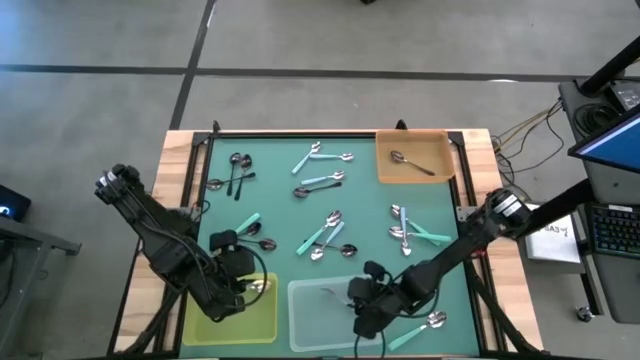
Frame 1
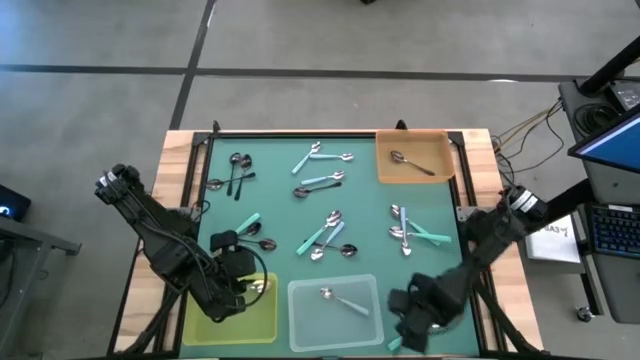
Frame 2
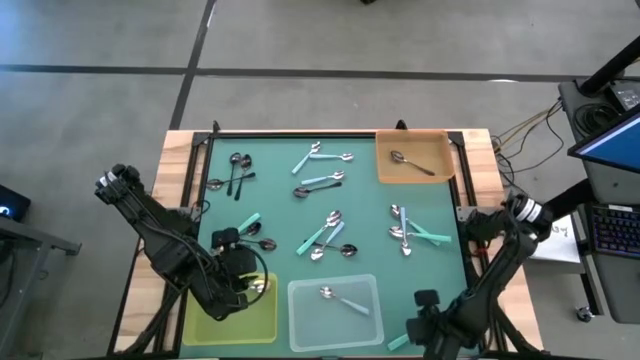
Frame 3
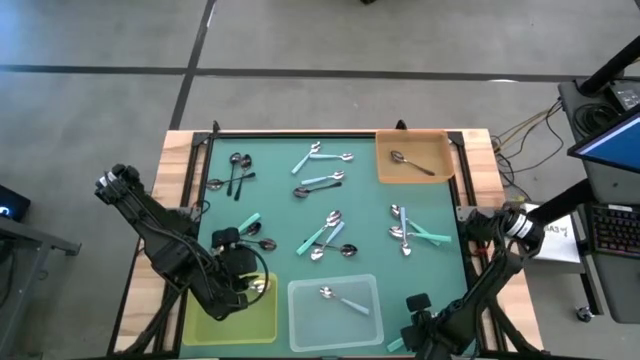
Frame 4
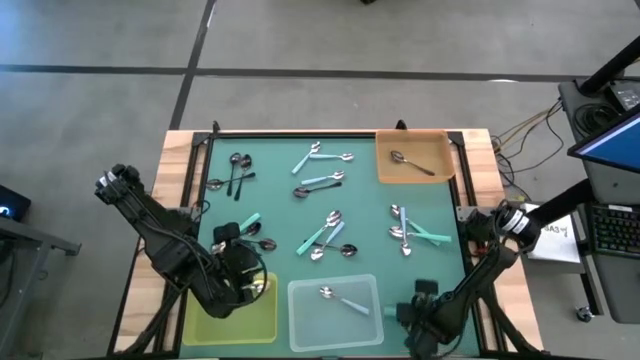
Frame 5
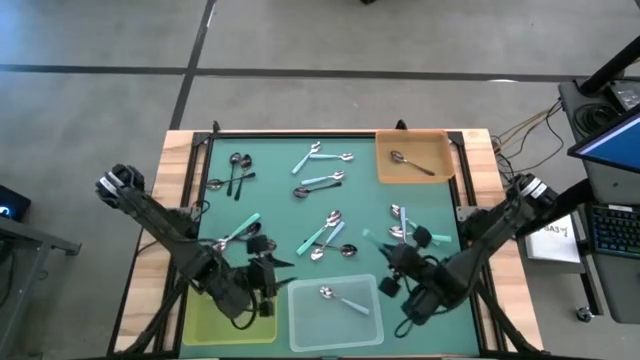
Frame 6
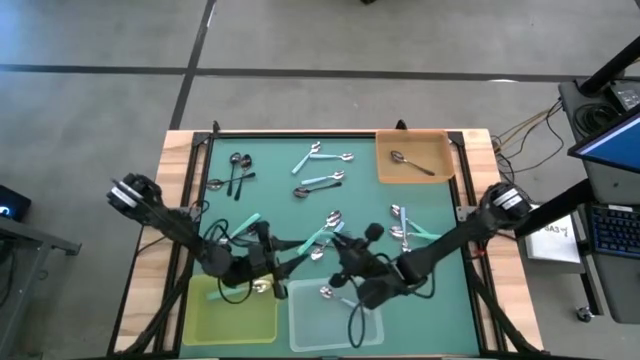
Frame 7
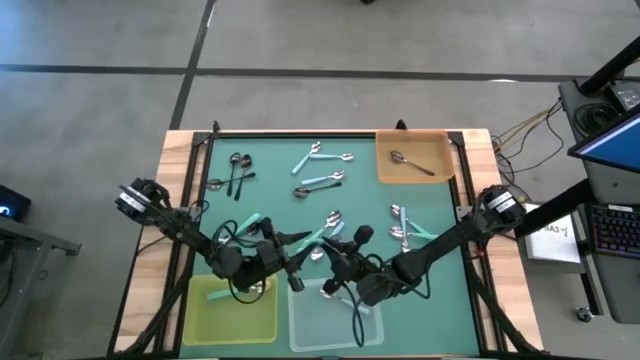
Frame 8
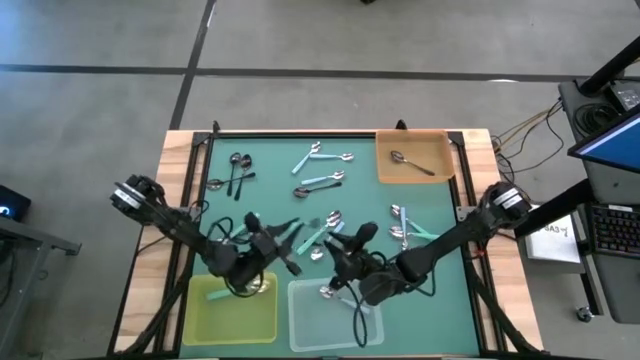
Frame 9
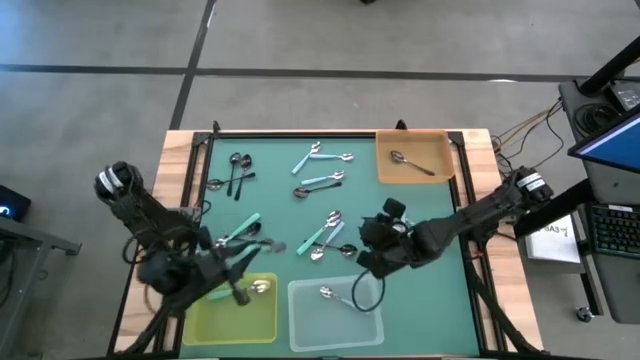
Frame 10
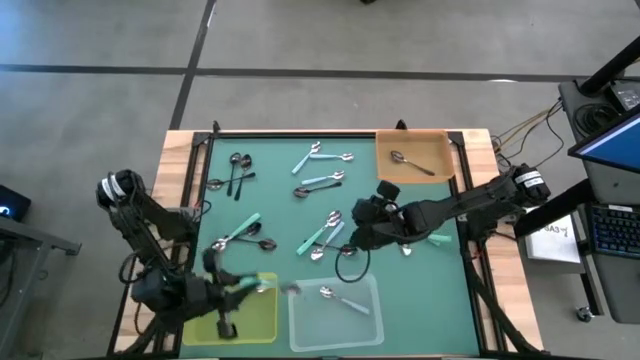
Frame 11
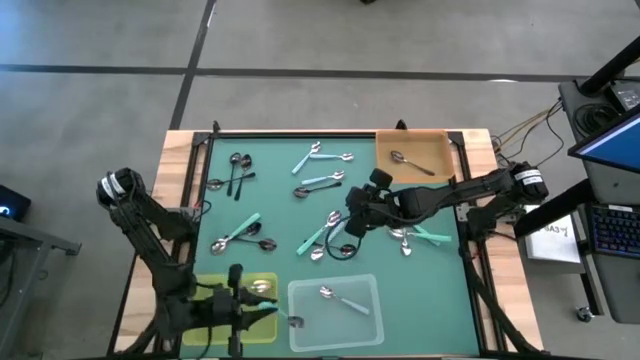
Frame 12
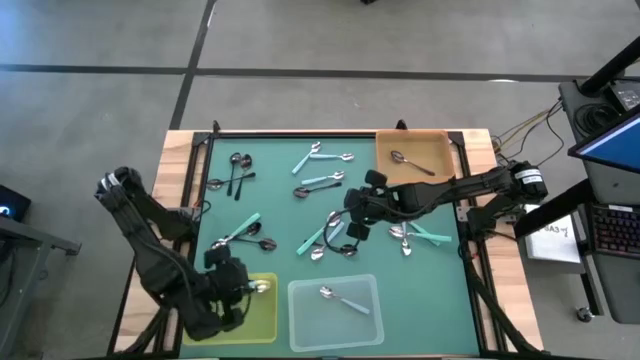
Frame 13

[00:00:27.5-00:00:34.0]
Task: Sort silverware by color (type)
Put the green spoon into the yellow bin

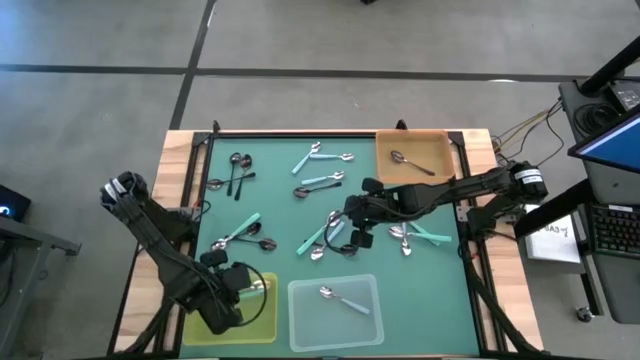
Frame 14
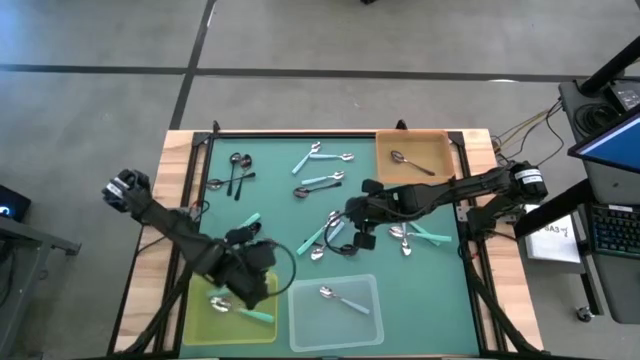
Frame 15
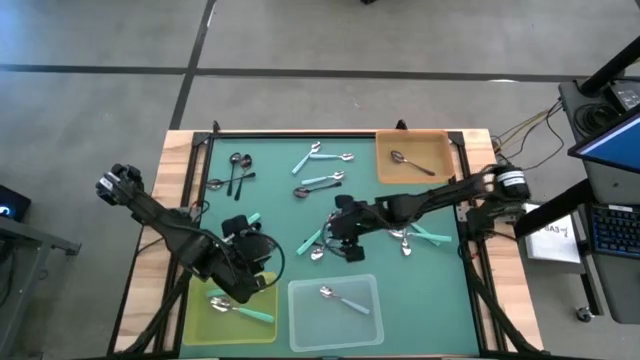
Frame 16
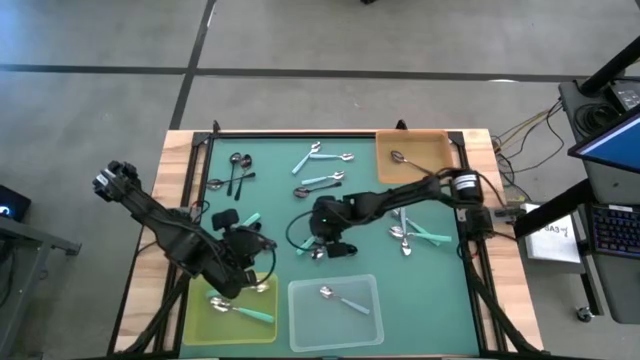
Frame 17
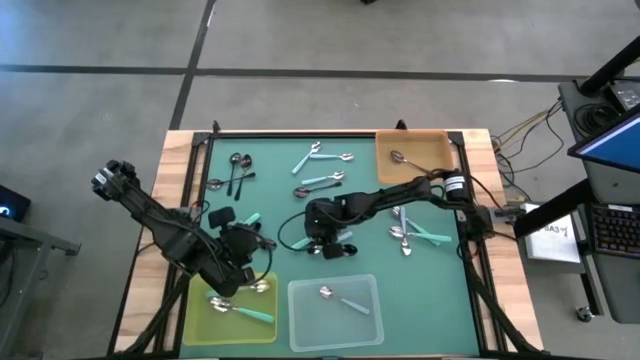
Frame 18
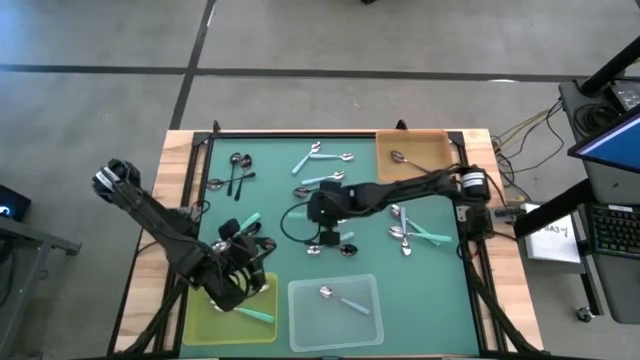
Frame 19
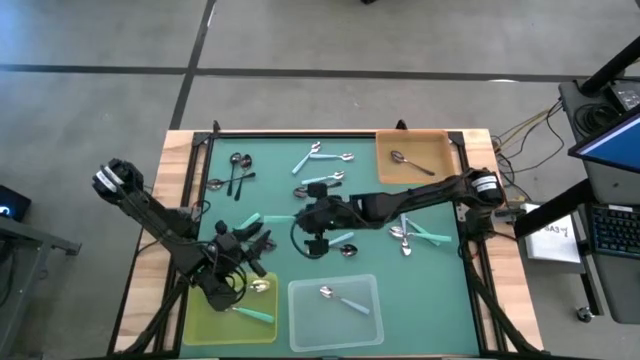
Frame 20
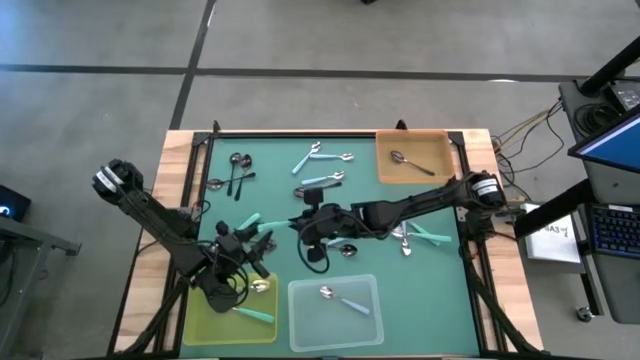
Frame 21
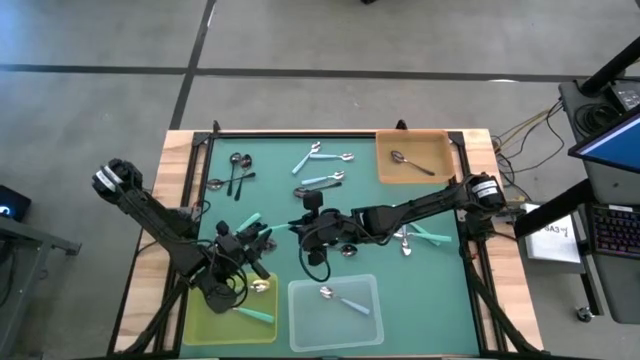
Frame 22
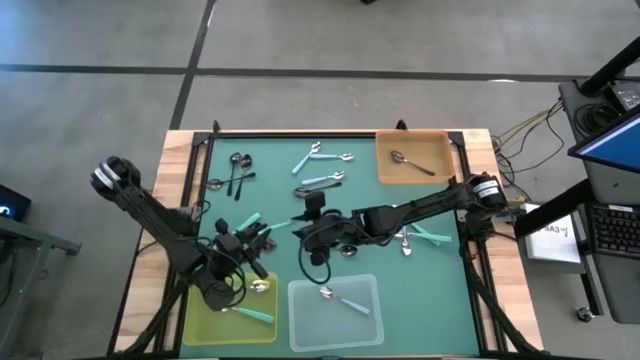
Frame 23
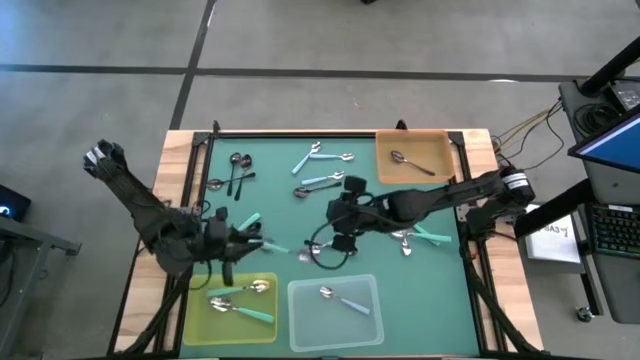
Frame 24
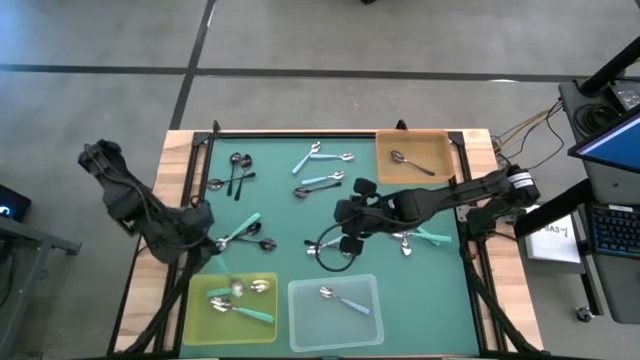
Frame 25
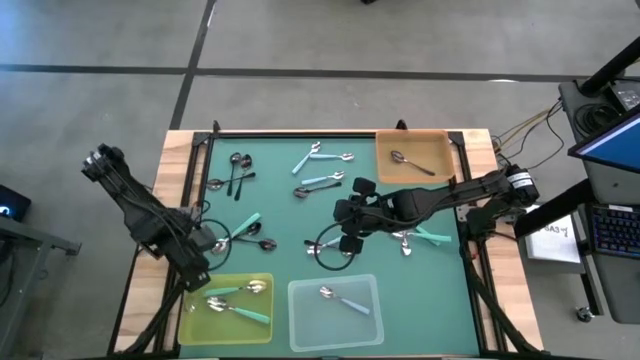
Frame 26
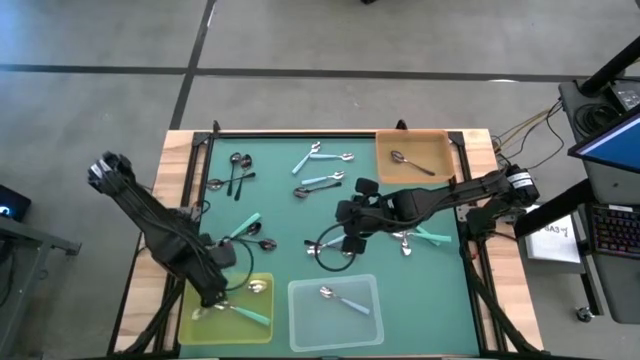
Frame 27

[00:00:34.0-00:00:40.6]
Put the green spoon into the yellow bin

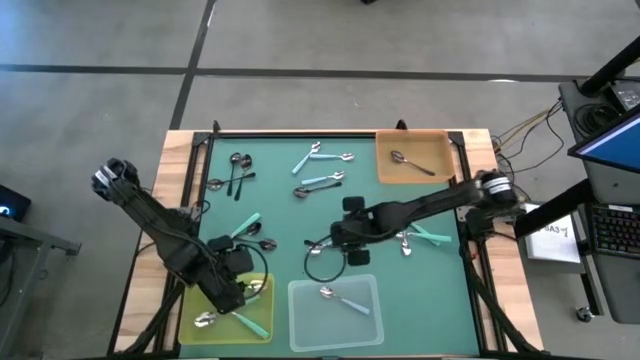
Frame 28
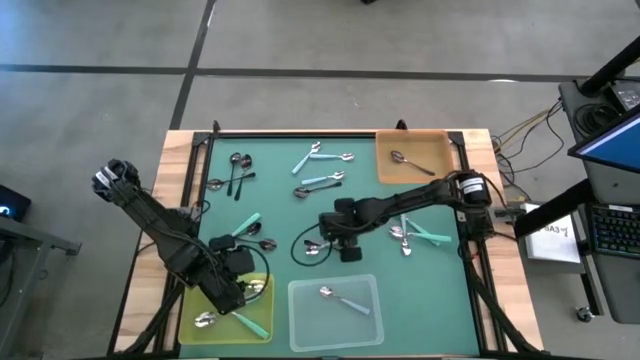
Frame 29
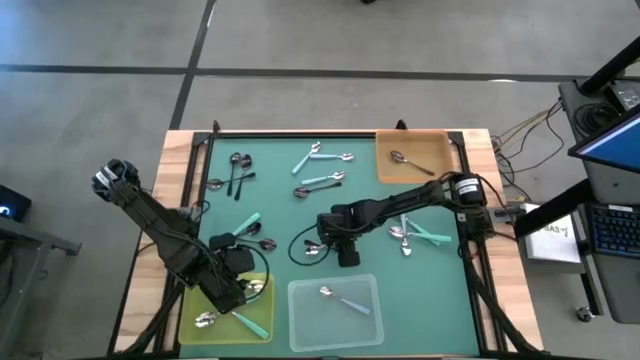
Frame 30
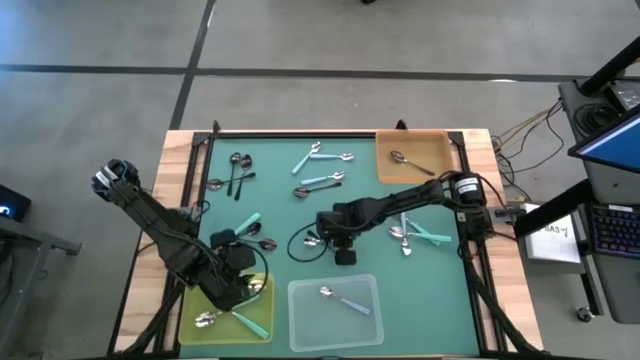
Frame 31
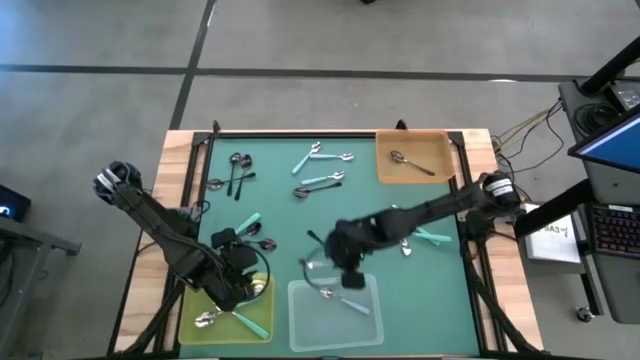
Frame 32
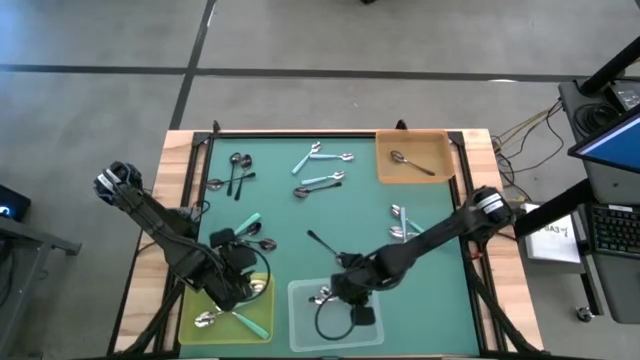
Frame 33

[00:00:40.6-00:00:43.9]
Put the blue spoon into the transparent bin

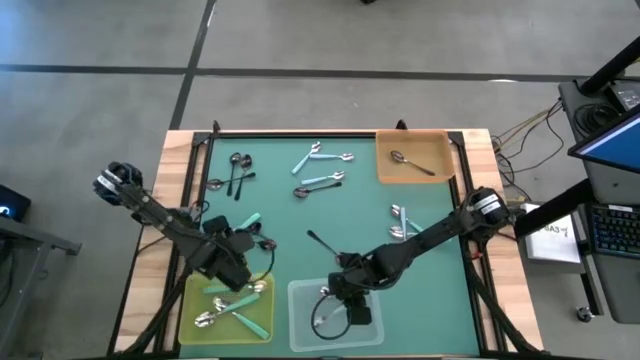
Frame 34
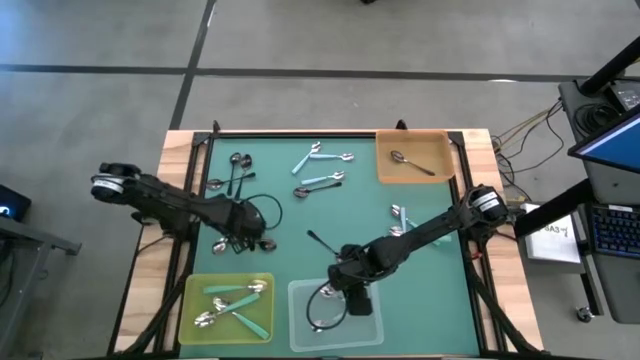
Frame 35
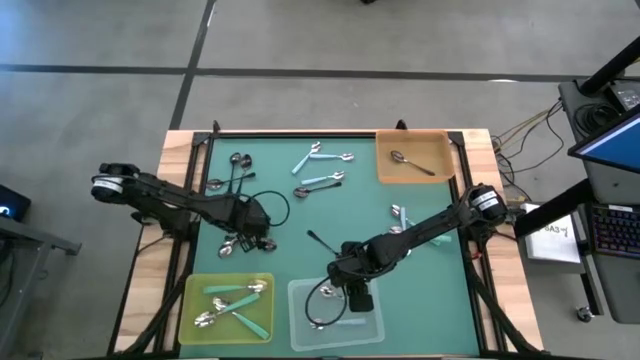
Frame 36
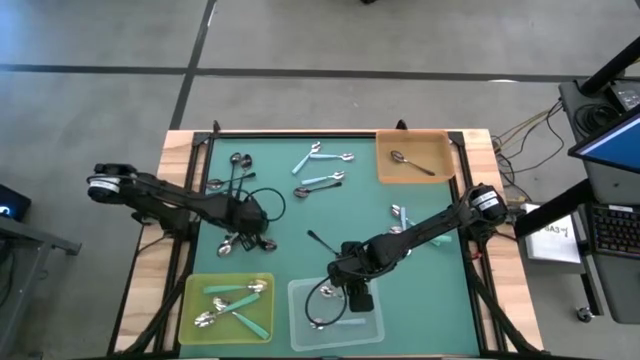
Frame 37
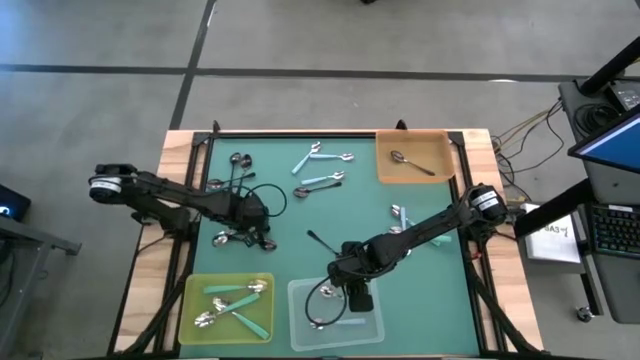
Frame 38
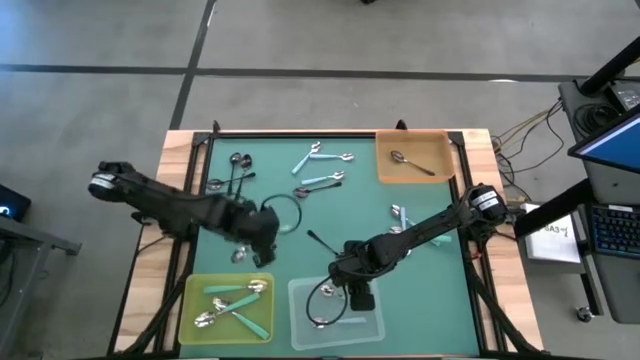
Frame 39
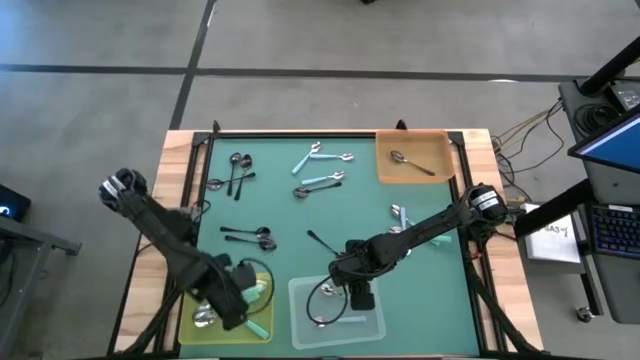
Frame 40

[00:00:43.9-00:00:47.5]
Put the green spoon into the yellow bin
